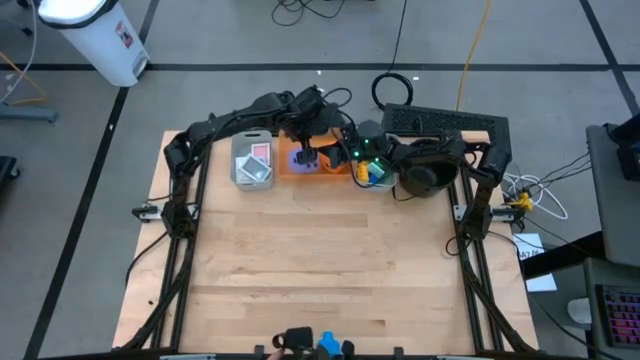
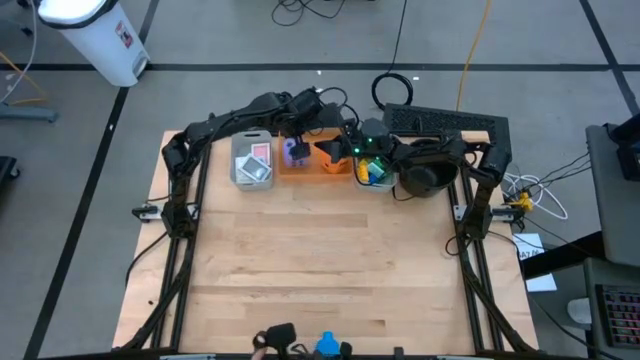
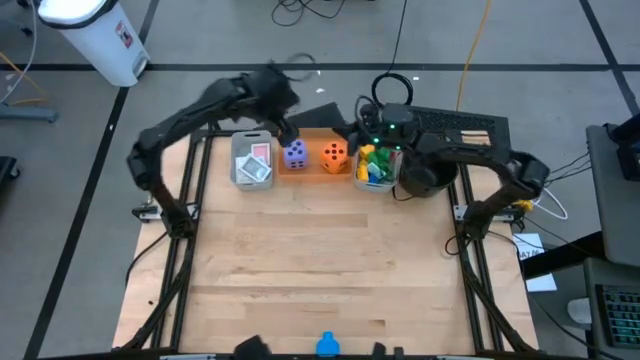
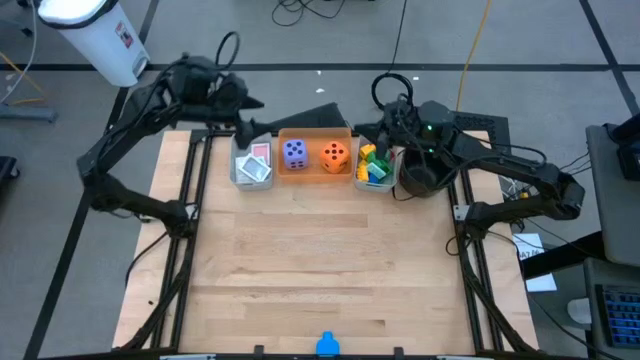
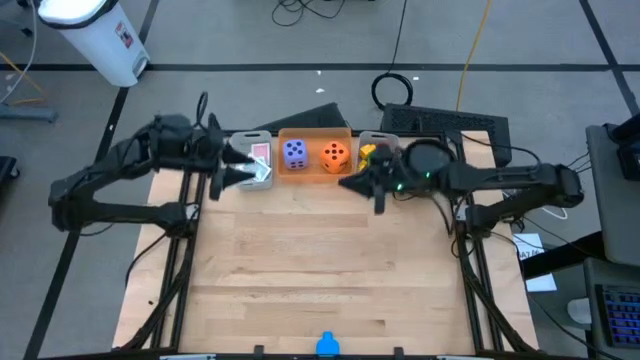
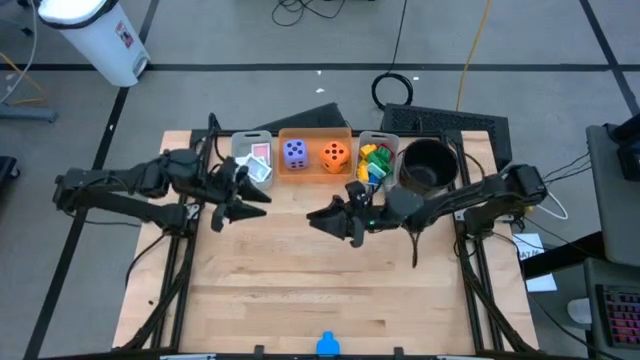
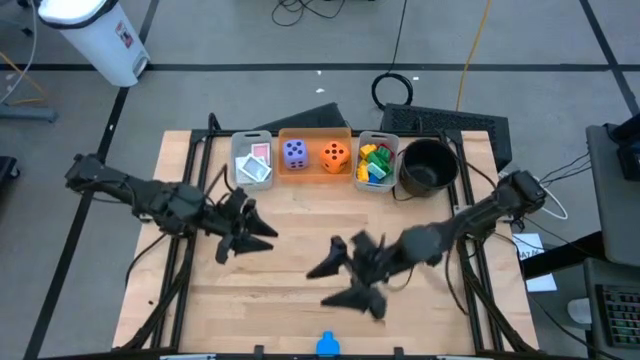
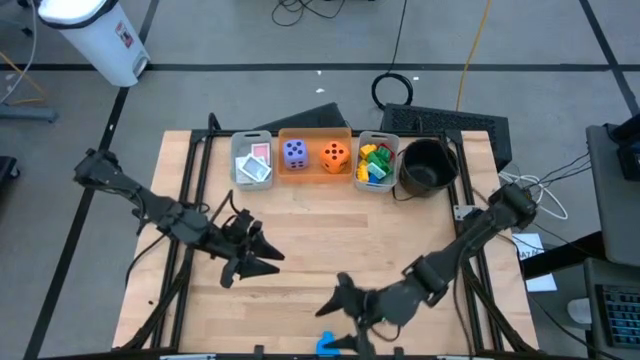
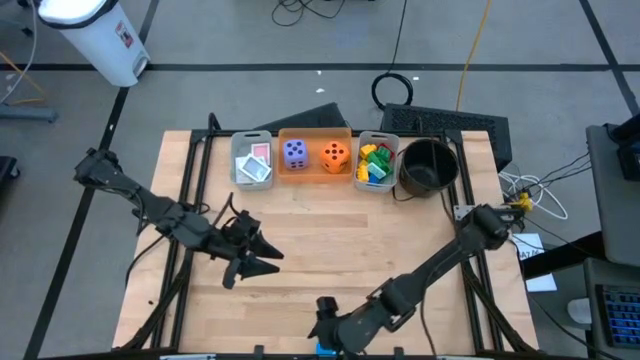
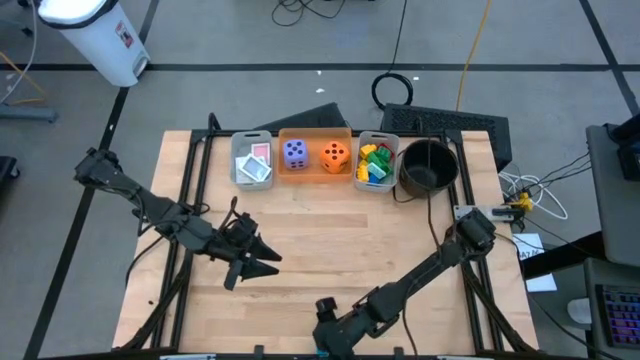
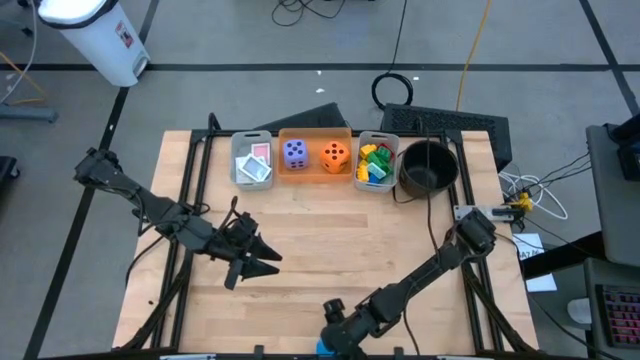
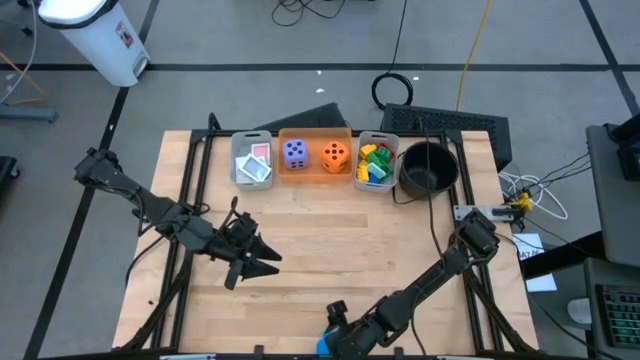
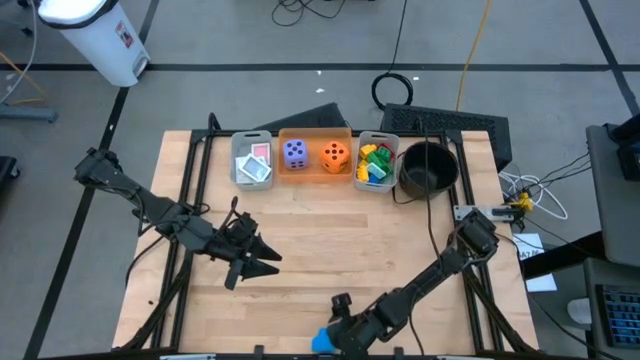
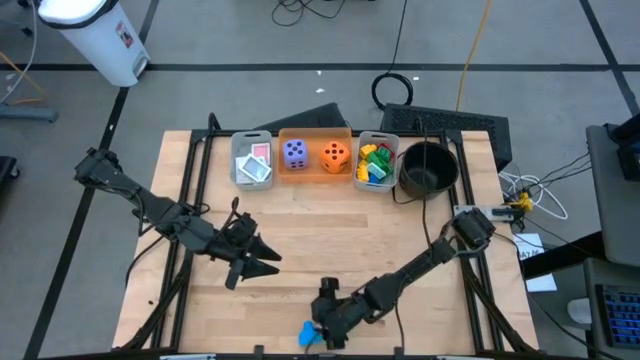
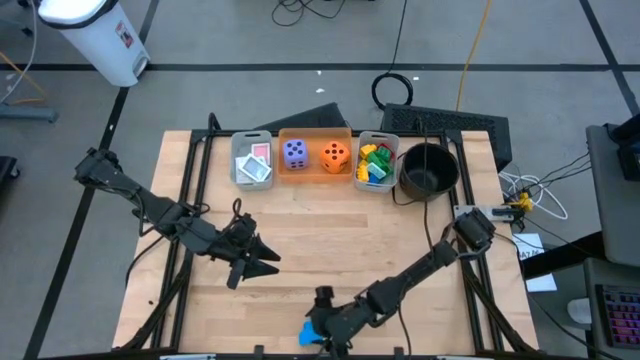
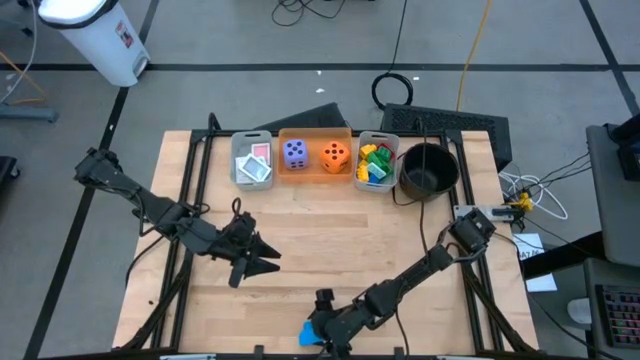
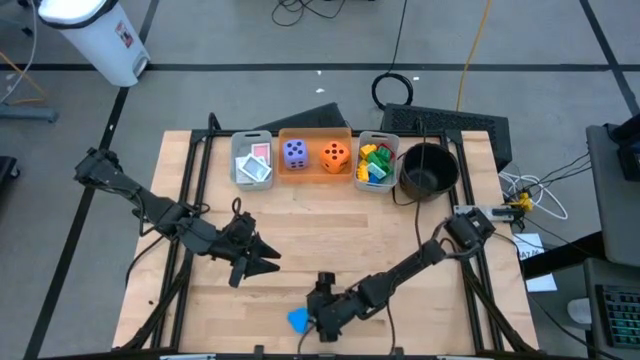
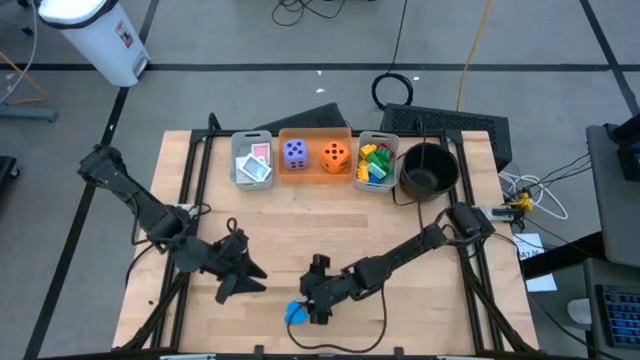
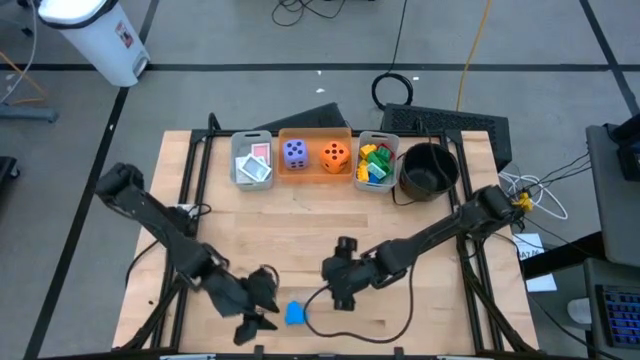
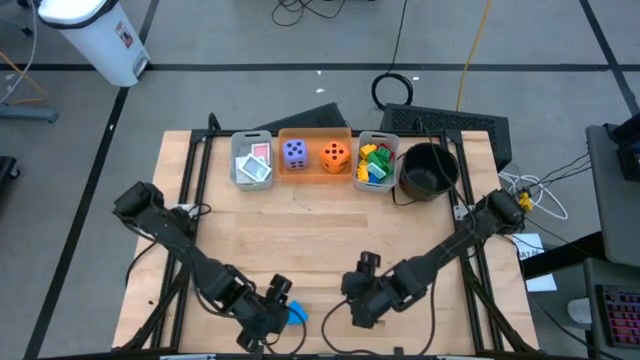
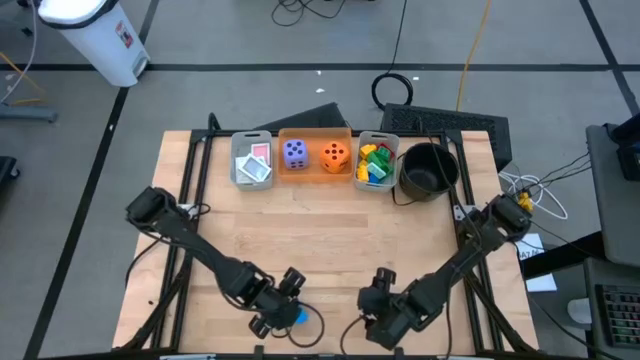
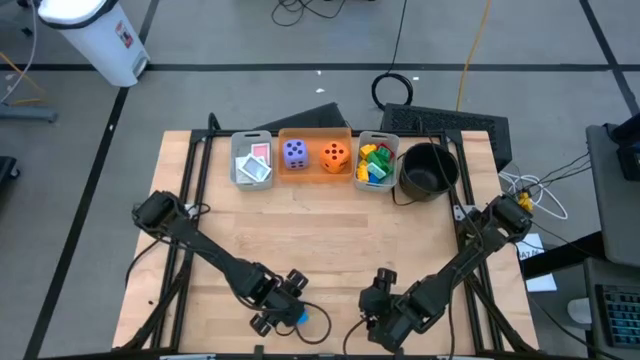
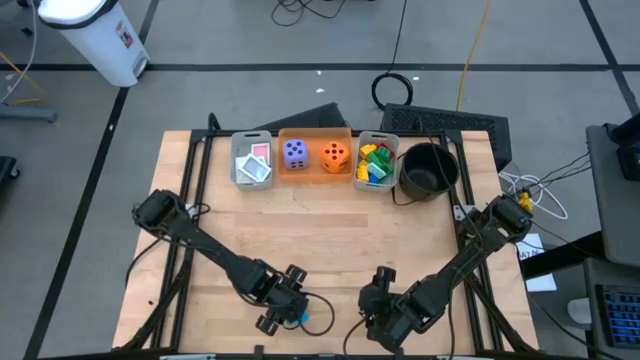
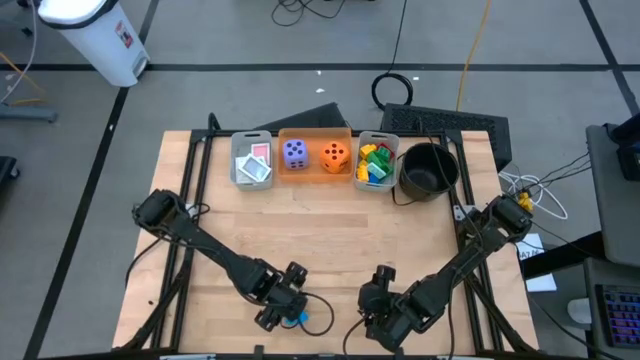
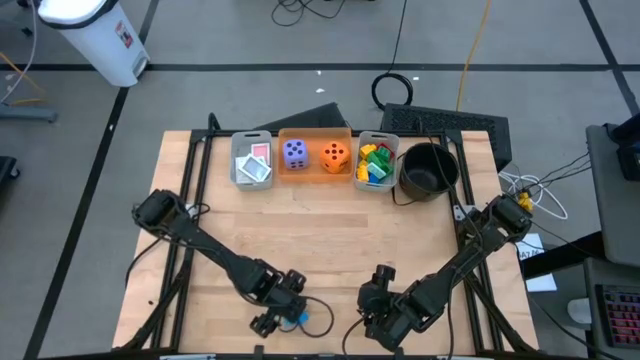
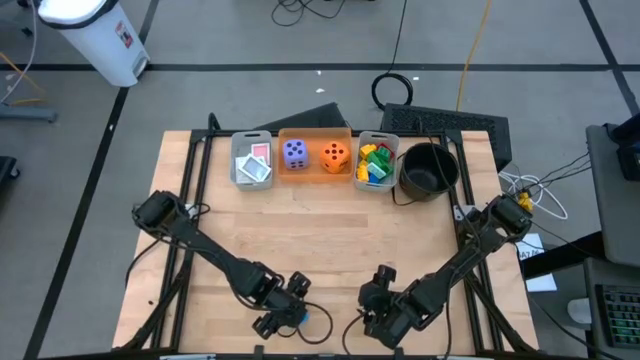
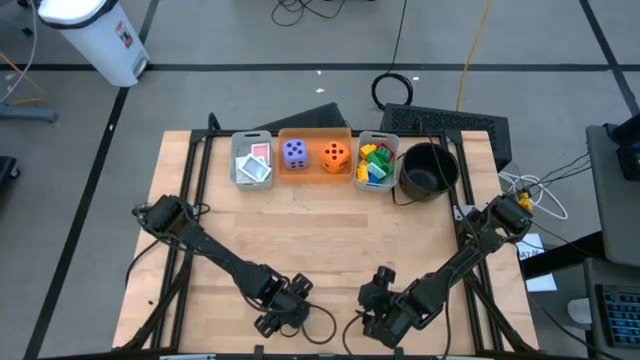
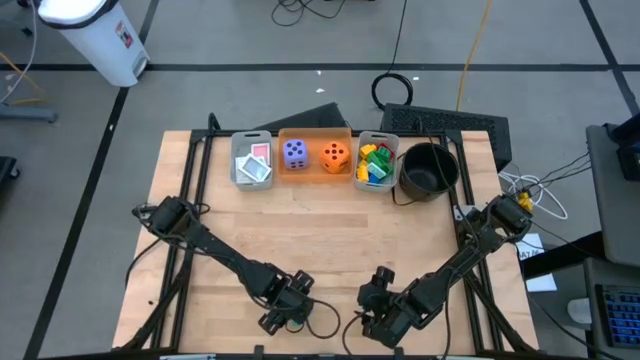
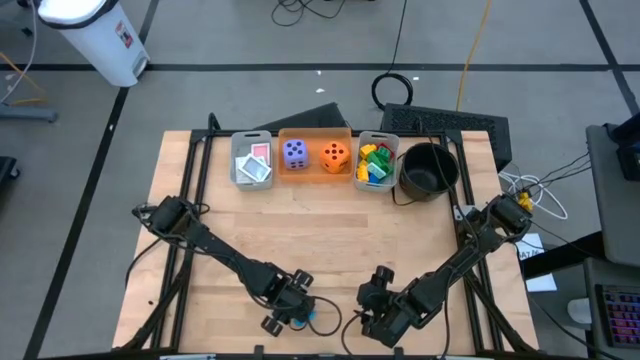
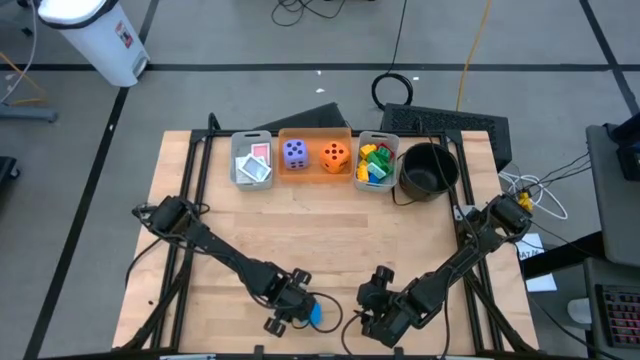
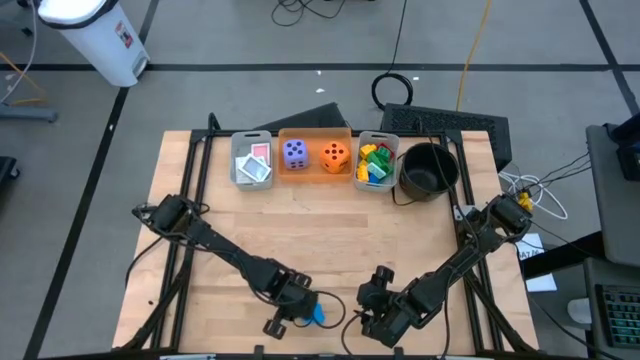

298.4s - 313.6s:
Task: Pick & Place Toys
Put the blue game piece into the right gray bin

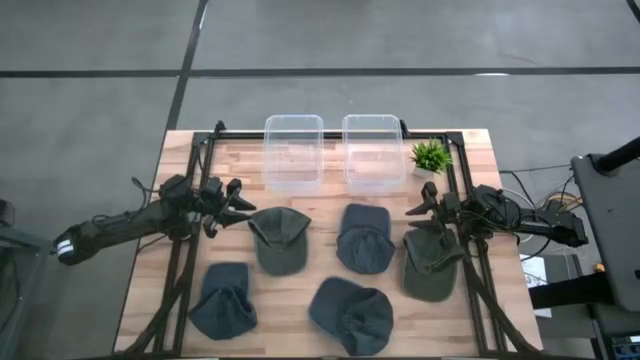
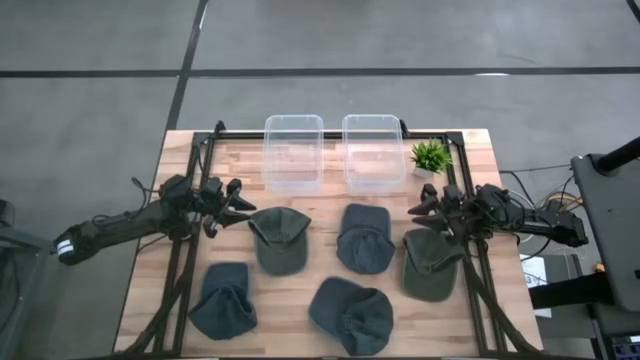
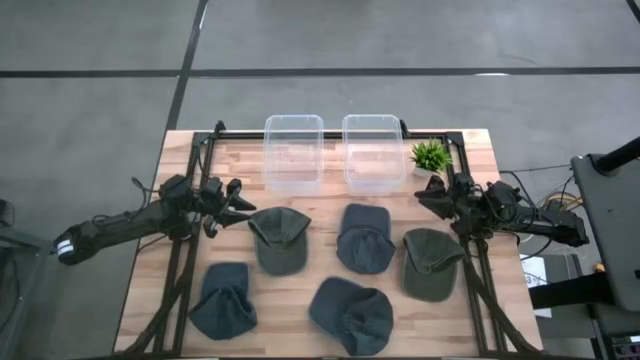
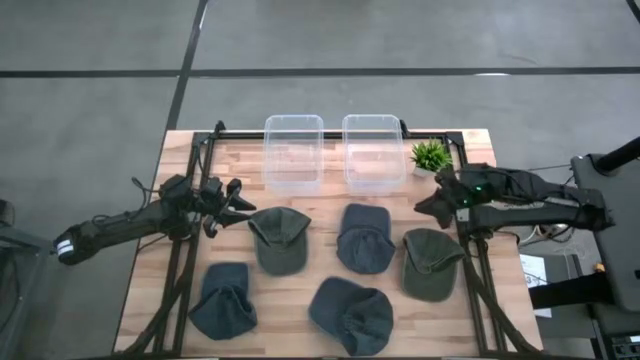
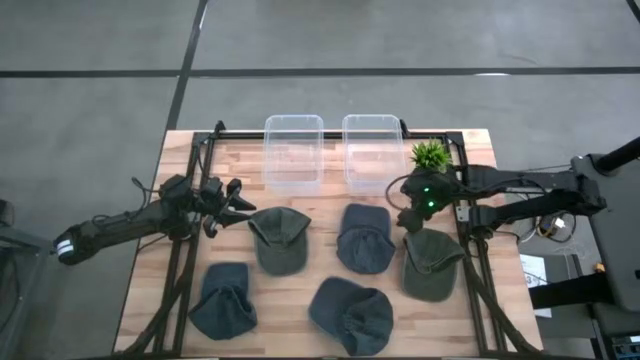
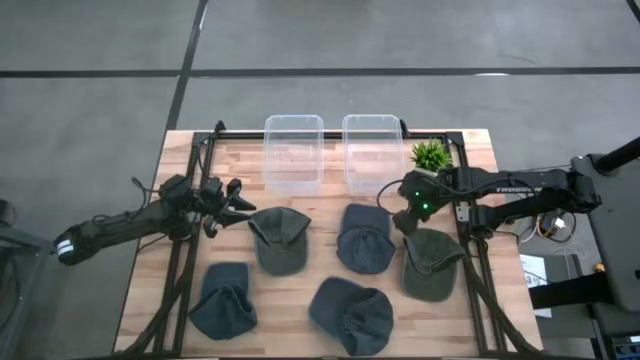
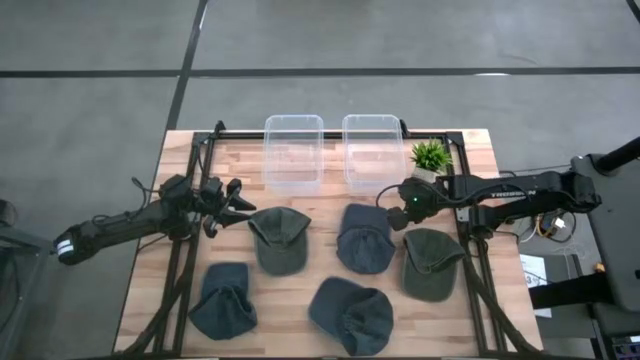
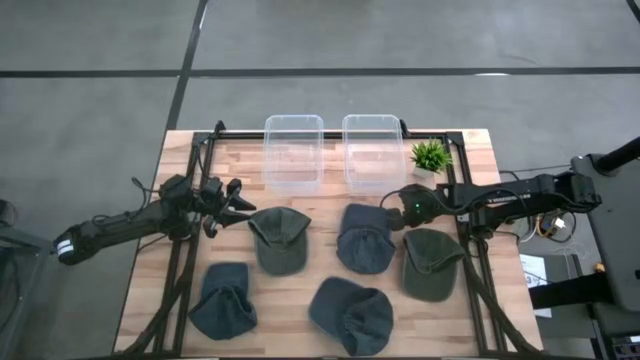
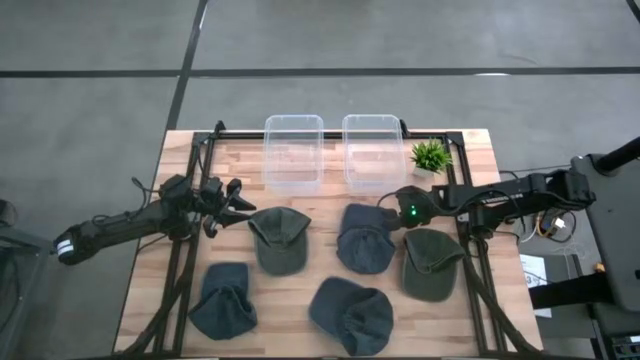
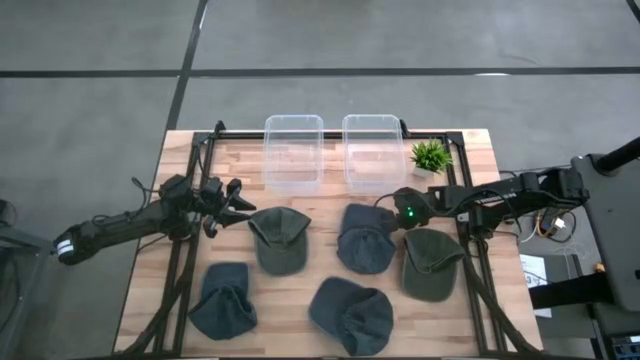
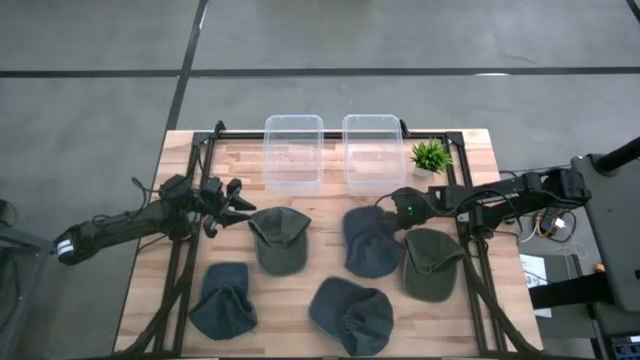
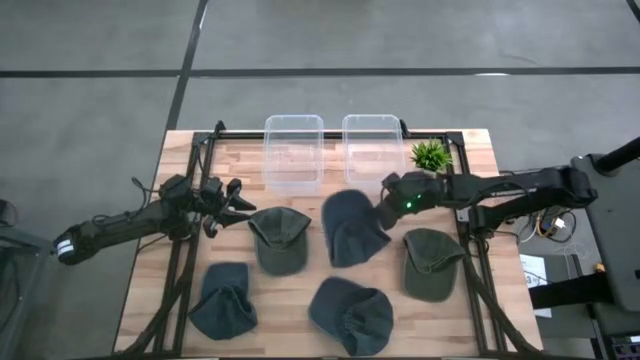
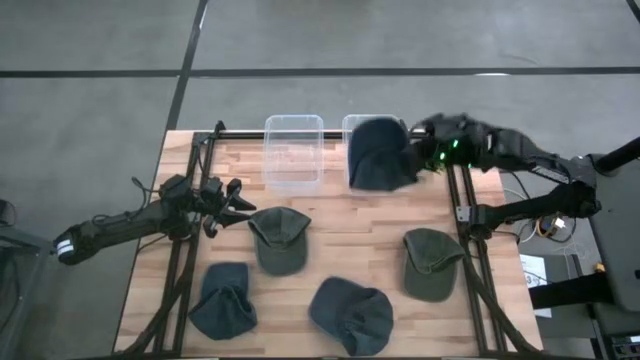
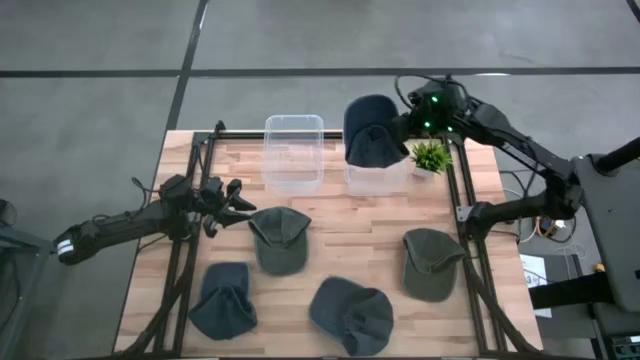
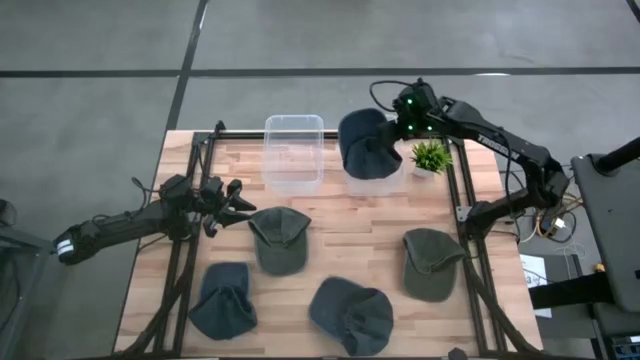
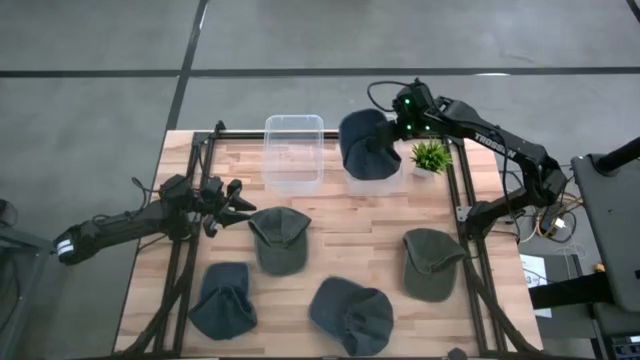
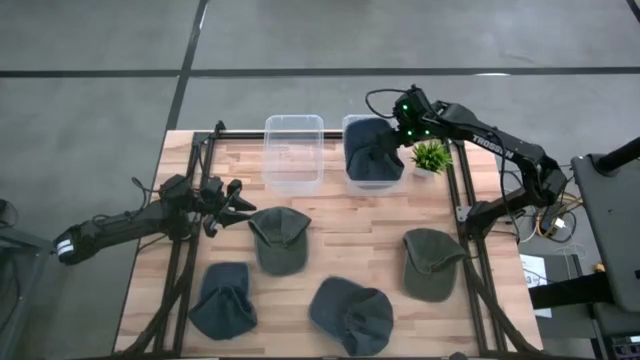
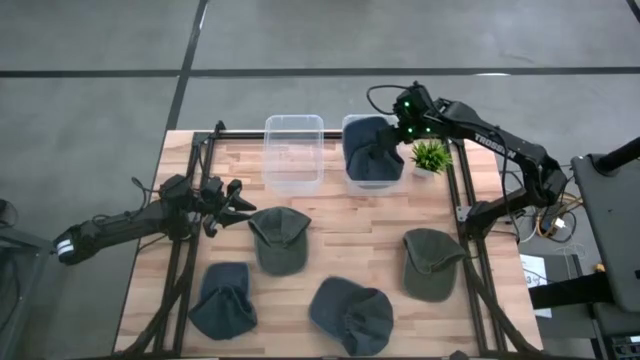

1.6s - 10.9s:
Task: Pick & Place hat
Put the top blue cap into the right transparent bin
